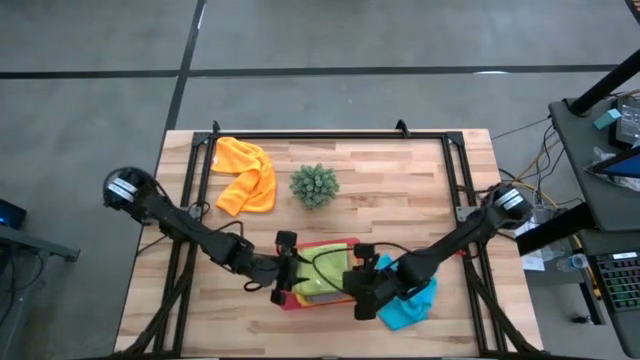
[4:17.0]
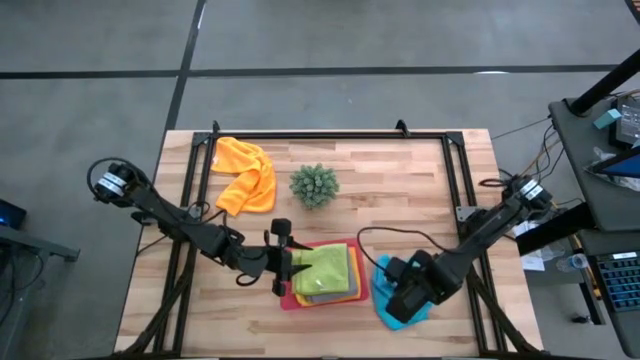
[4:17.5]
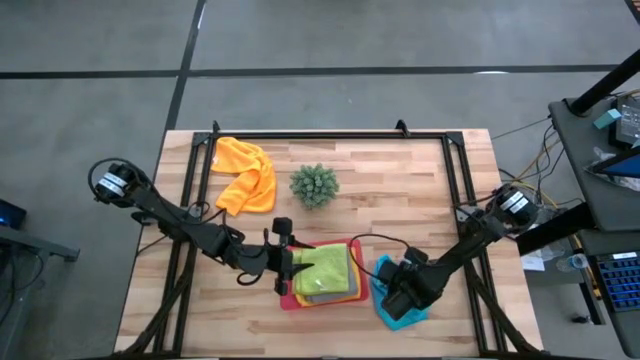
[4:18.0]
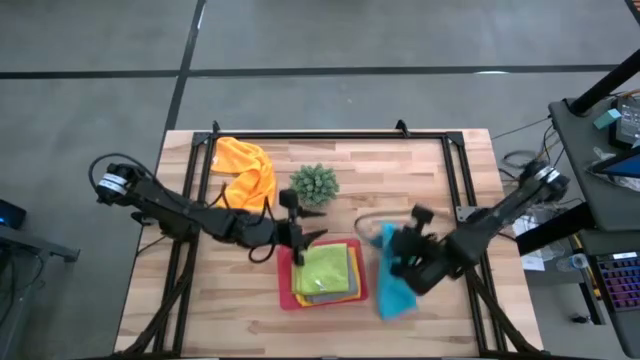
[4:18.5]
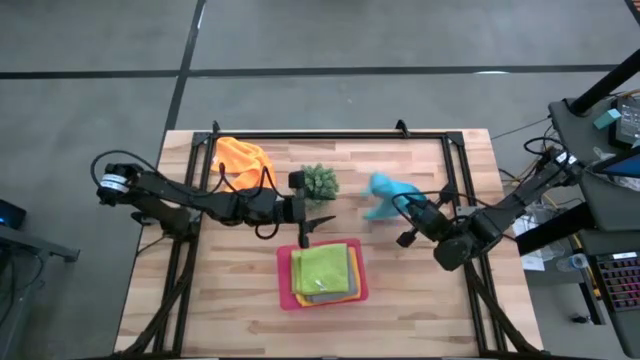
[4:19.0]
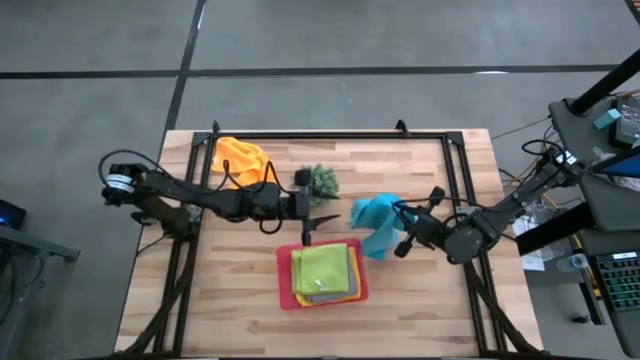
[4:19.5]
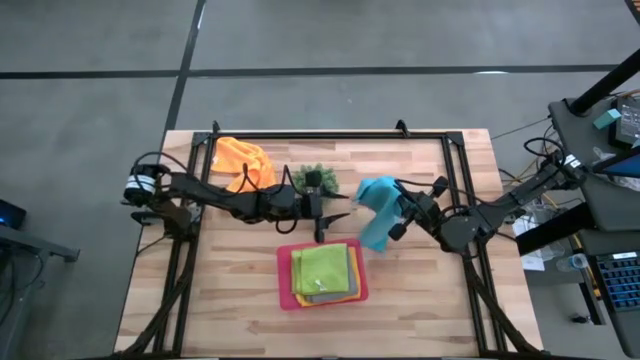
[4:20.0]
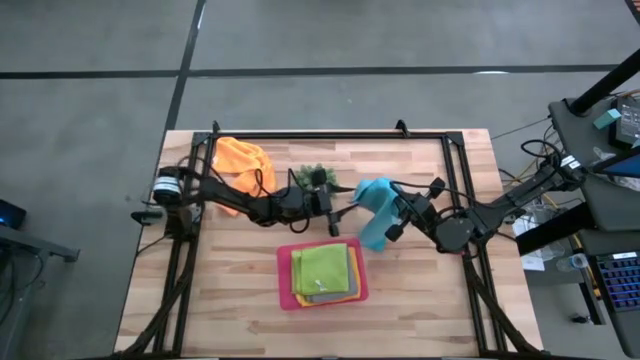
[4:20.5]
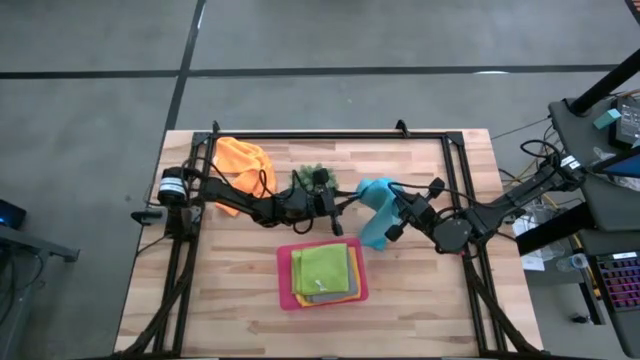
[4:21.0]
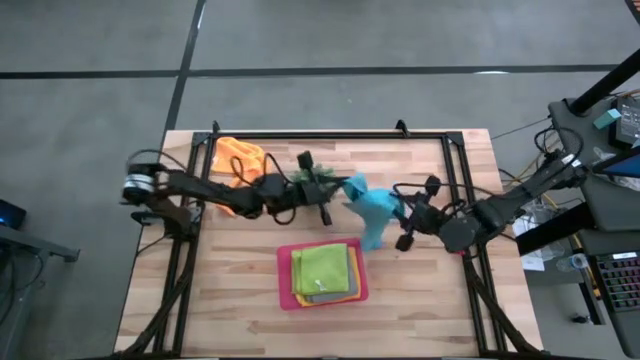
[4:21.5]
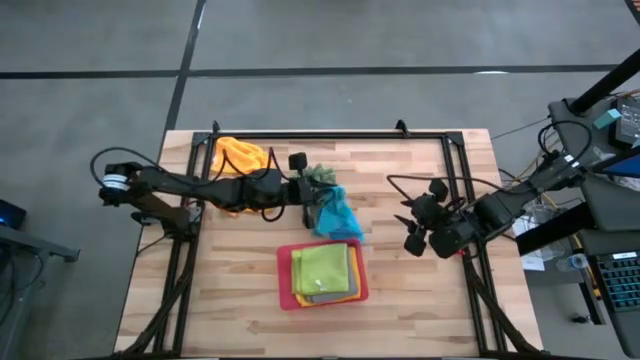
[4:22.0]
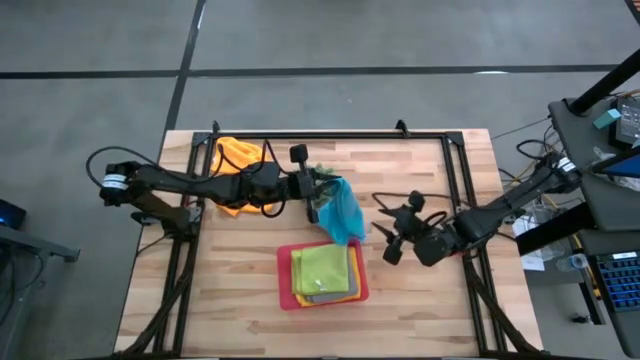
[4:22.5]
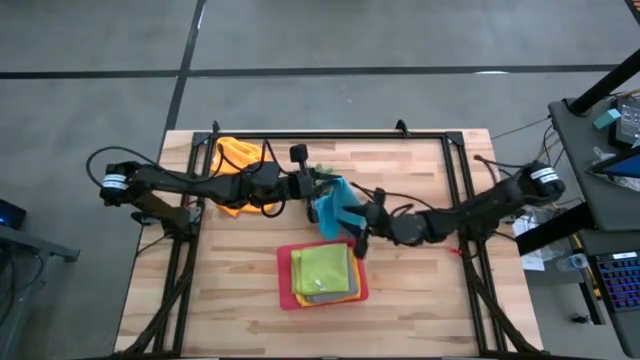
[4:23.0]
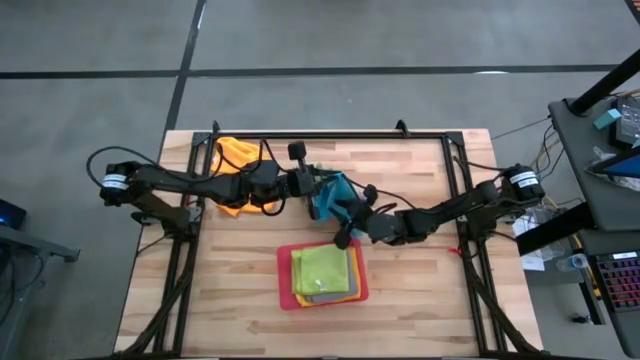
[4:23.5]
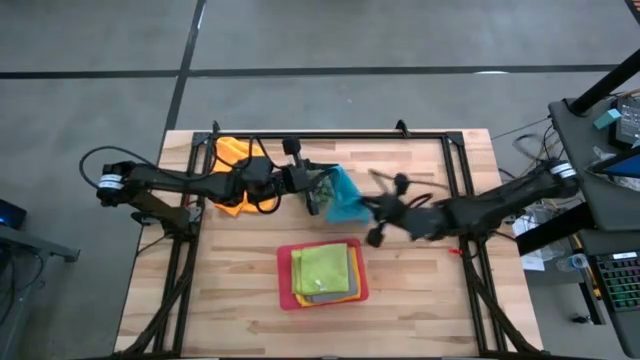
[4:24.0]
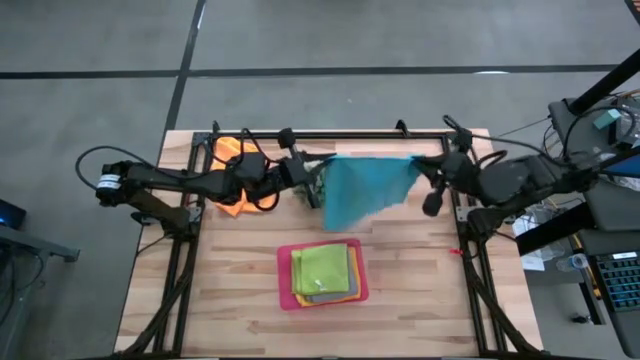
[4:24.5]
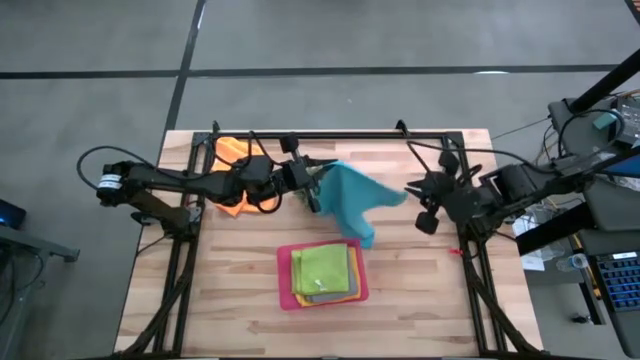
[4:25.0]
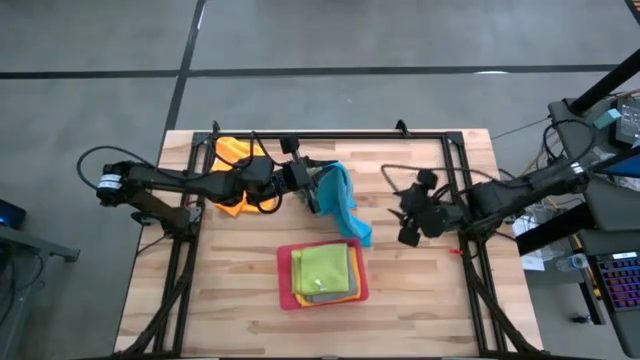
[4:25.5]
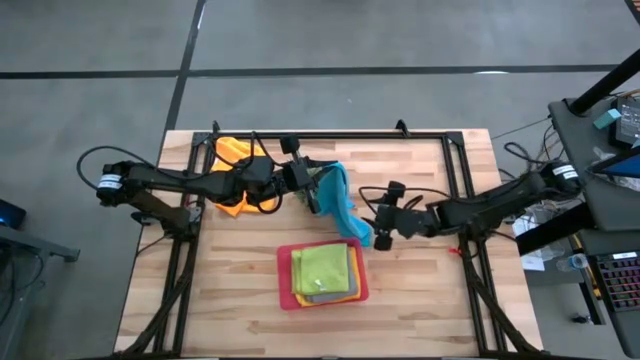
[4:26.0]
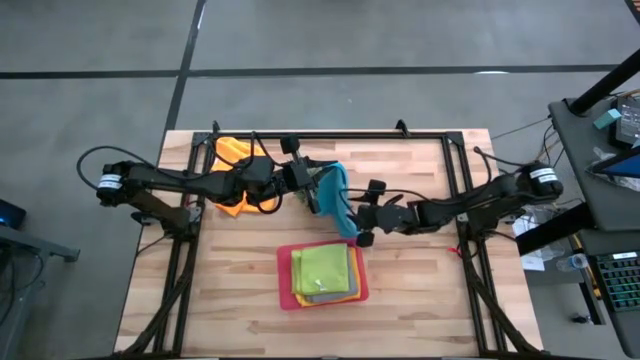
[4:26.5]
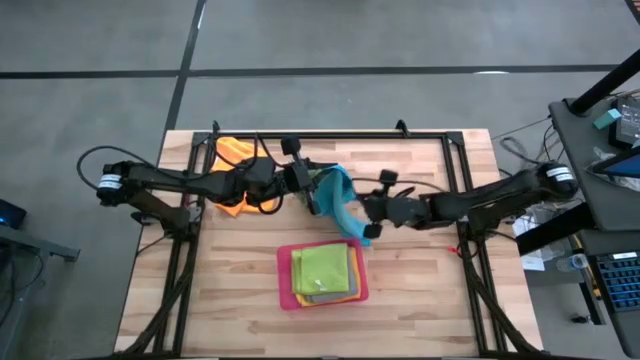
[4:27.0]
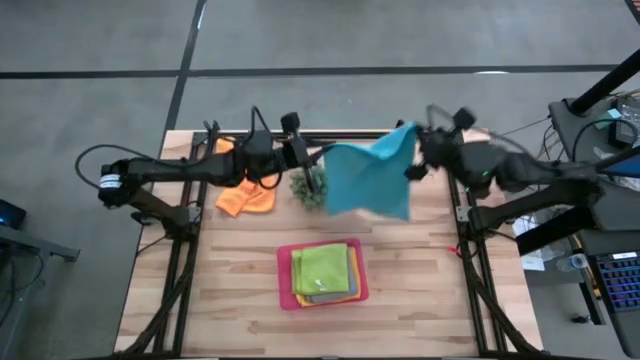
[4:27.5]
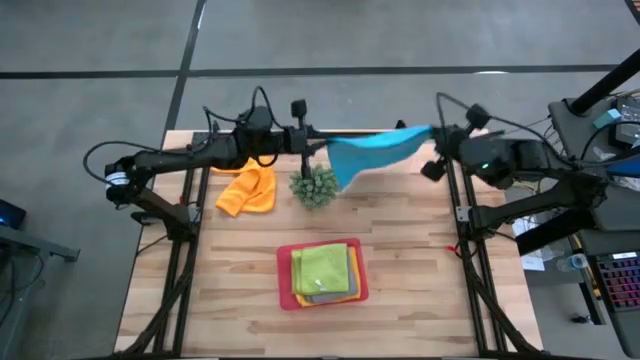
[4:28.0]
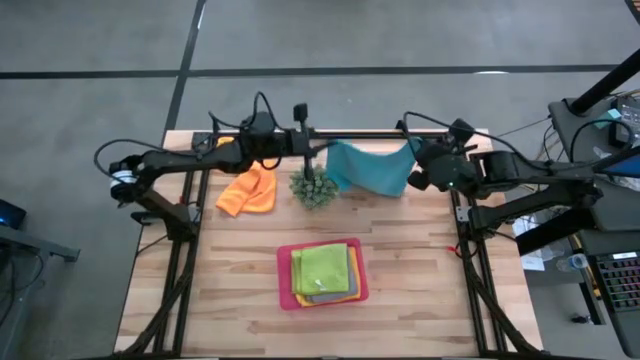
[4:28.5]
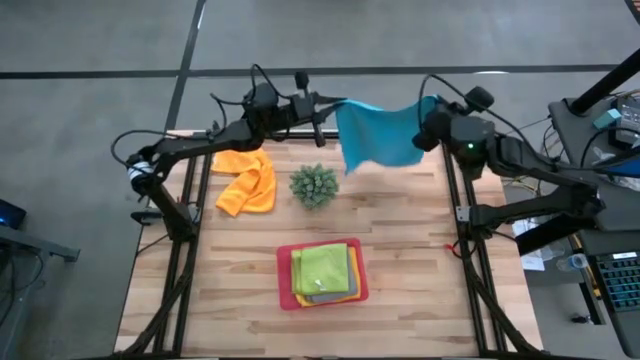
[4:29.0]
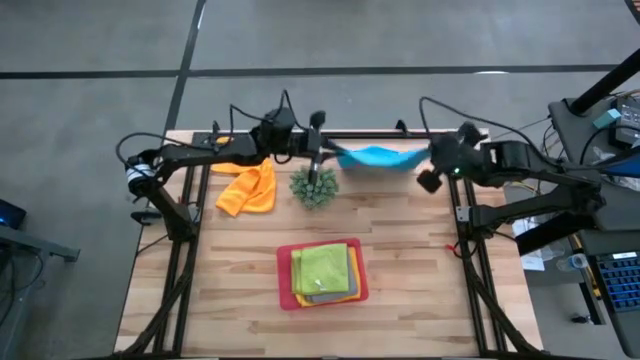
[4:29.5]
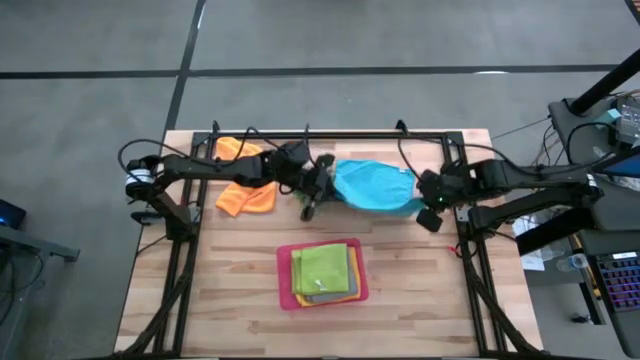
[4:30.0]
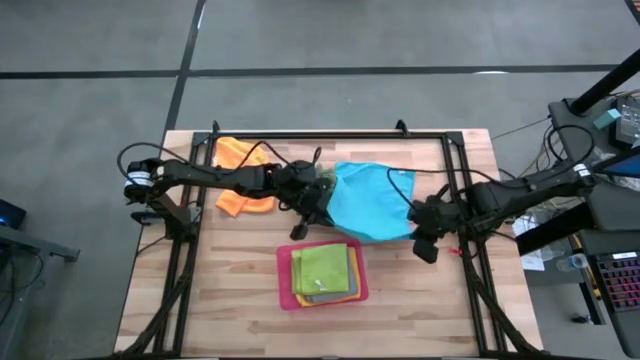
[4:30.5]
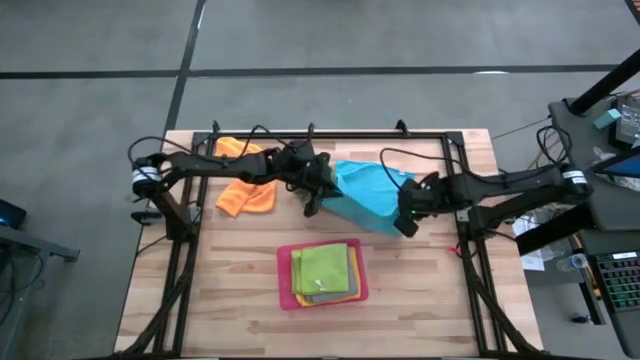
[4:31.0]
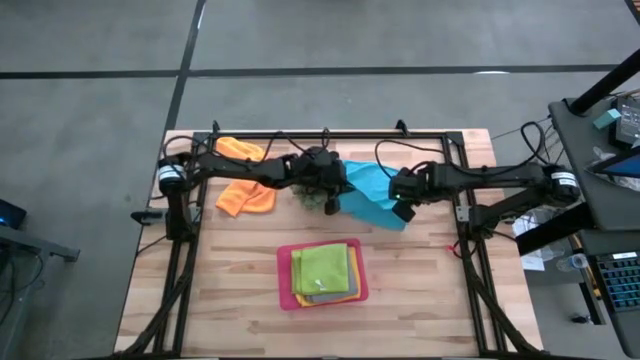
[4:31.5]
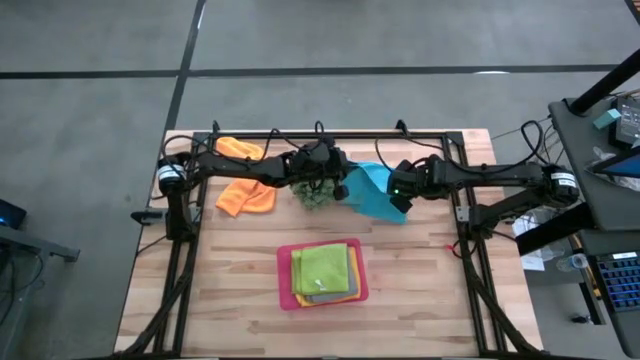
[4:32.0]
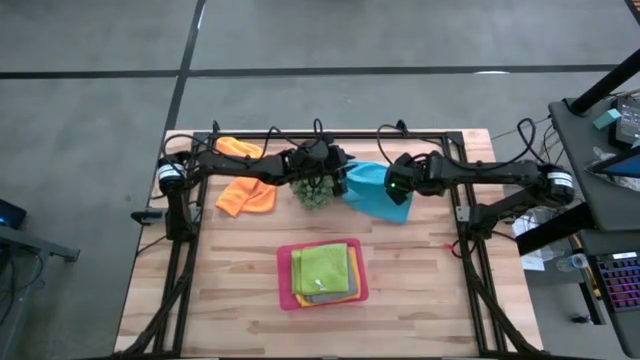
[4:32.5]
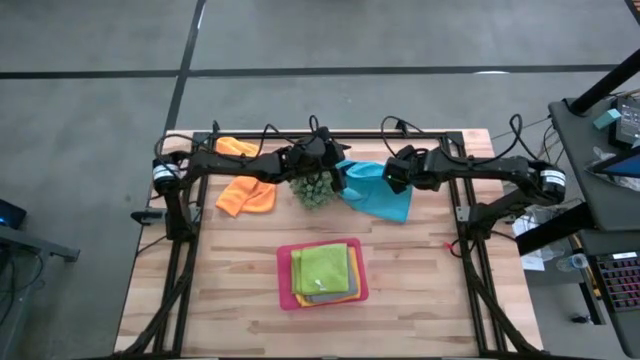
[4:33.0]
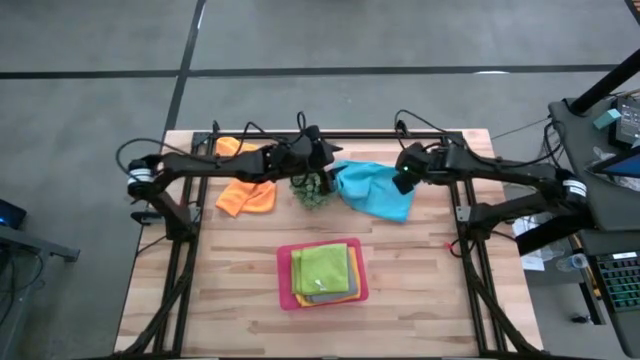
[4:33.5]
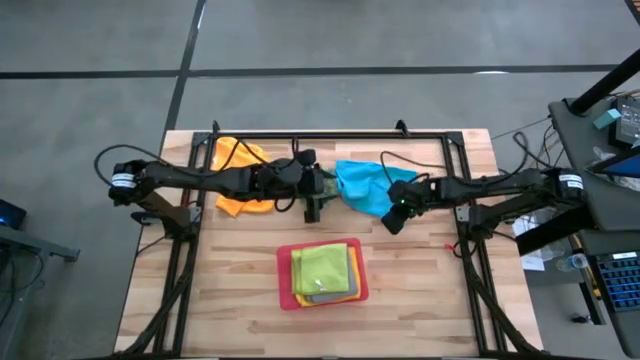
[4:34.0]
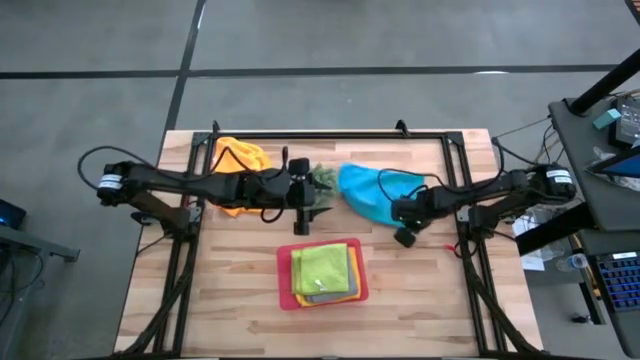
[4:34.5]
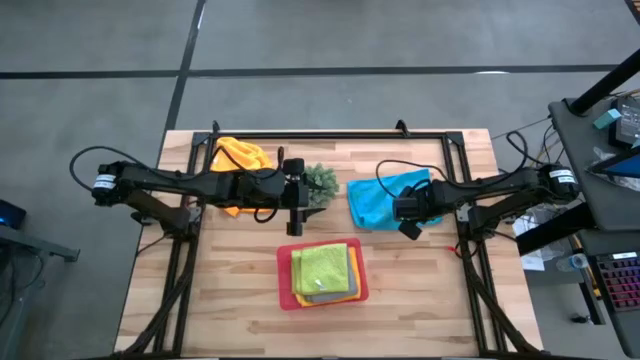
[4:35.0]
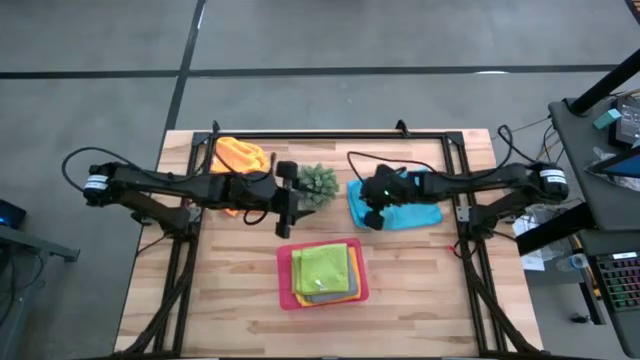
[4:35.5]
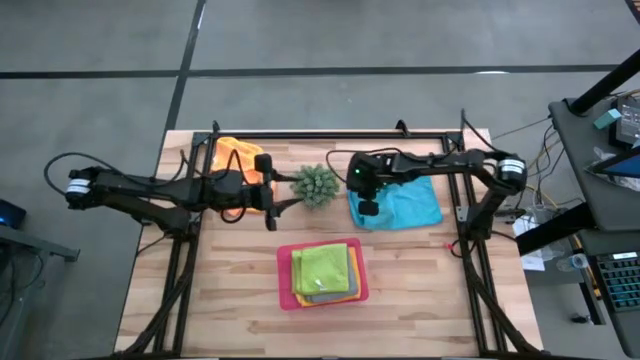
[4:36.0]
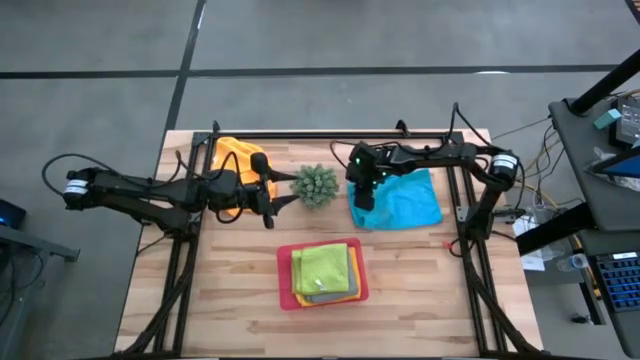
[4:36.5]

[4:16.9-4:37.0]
Task: Fold microfiber towels
Fold the blue microfiber cloth

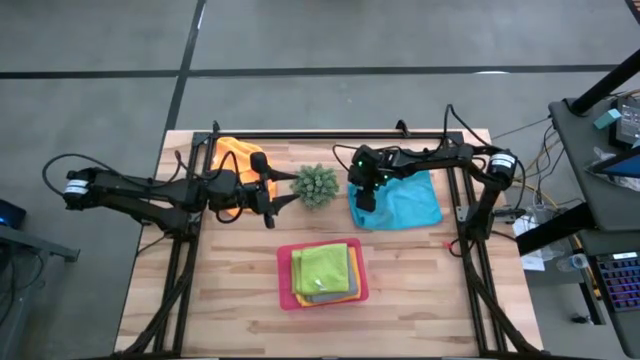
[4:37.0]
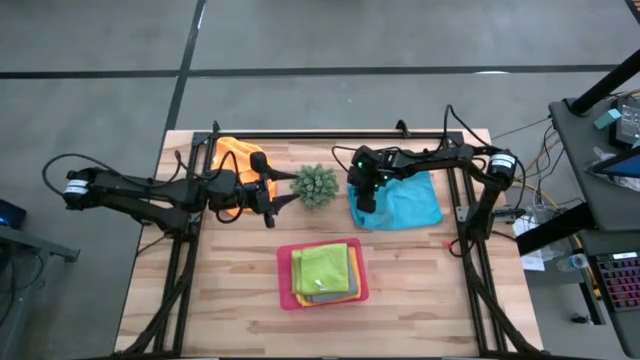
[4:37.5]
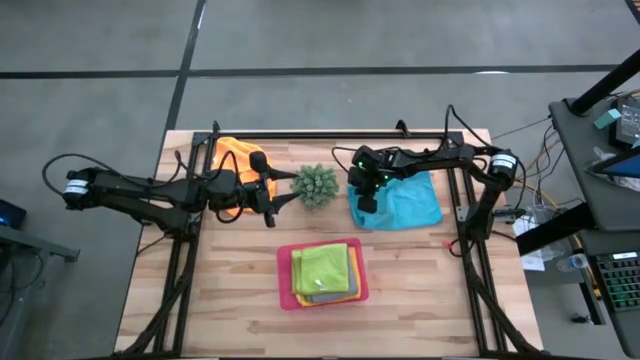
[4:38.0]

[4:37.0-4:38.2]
Fold the blue microfiber cloth
